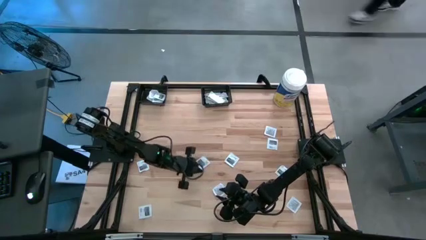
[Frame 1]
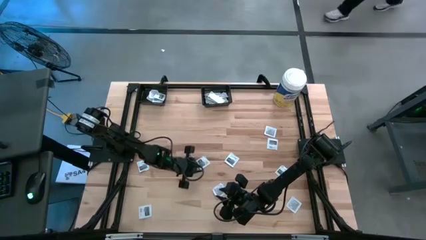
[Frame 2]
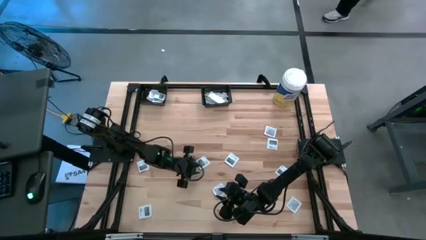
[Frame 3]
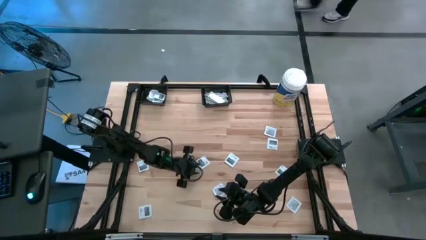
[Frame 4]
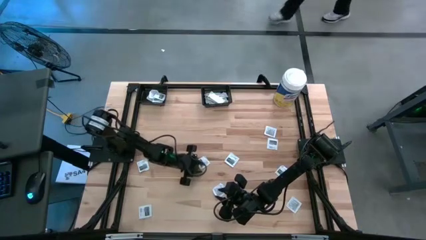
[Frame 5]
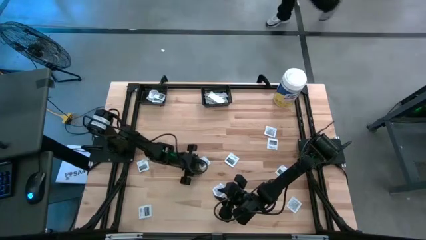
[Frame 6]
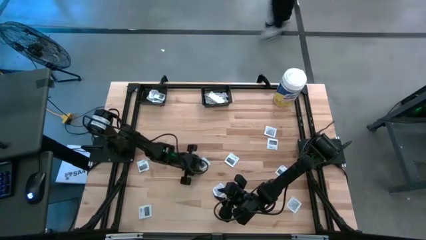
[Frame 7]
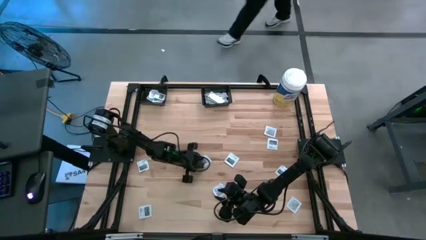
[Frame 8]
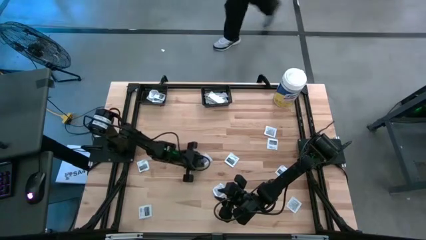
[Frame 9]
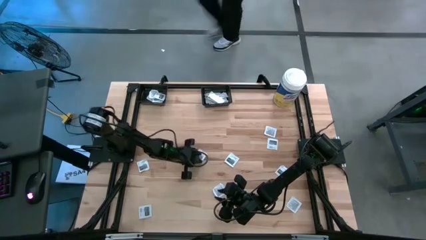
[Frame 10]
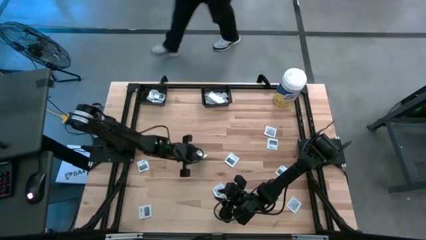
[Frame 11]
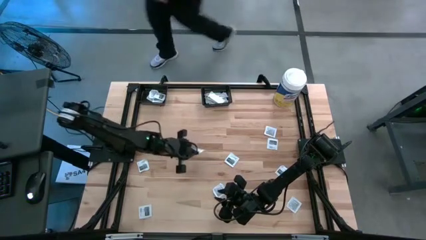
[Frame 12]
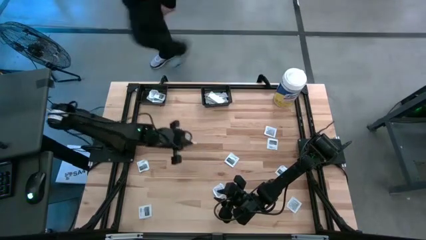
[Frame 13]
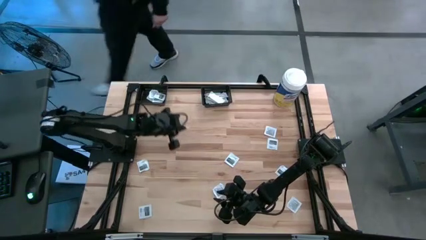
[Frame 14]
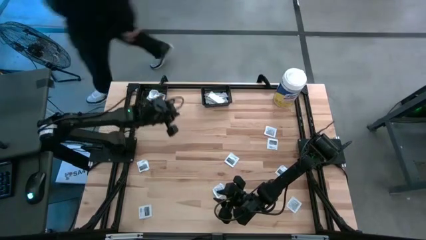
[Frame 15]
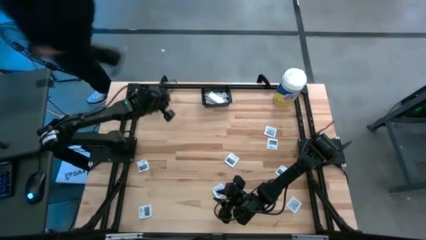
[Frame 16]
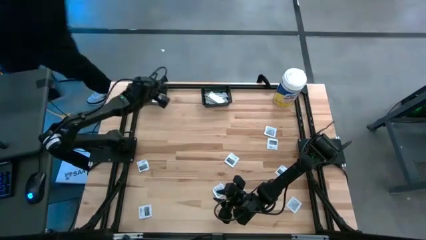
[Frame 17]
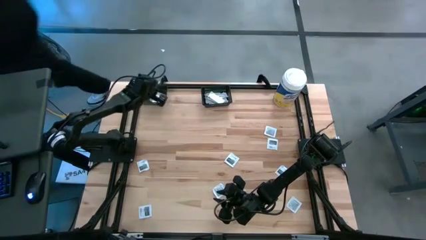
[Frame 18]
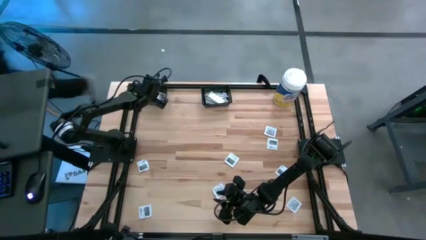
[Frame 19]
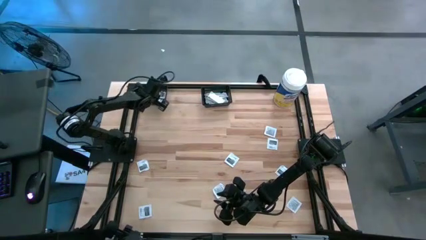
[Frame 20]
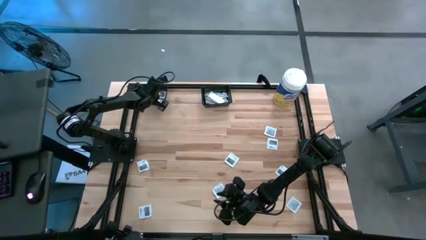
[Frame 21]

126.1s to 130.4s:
Task: Pick & Place First Aid Supplies
Put the gray towelette pack into the left black bin

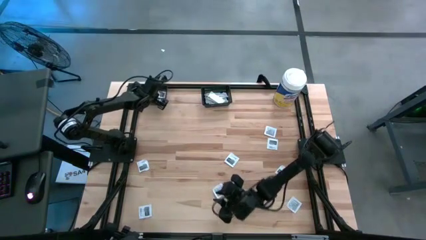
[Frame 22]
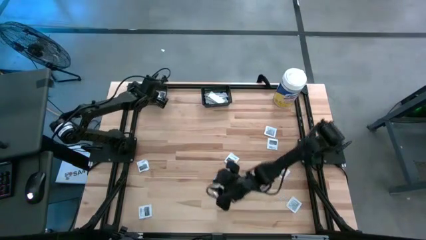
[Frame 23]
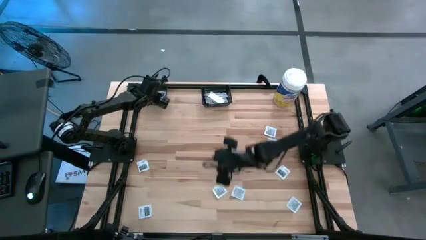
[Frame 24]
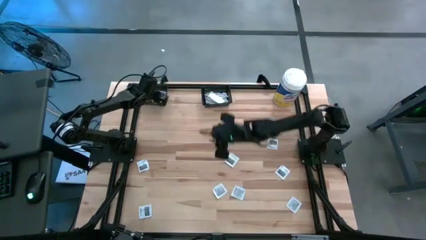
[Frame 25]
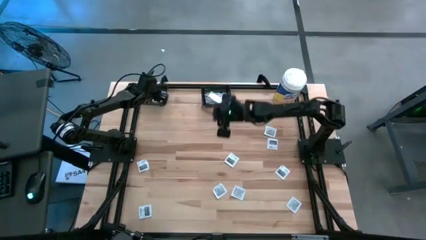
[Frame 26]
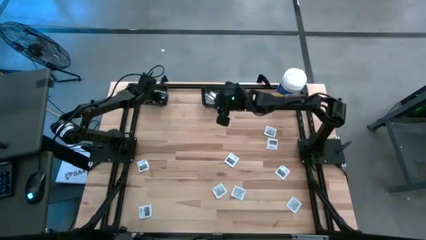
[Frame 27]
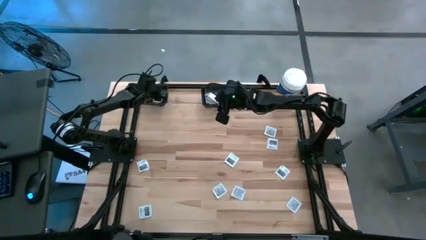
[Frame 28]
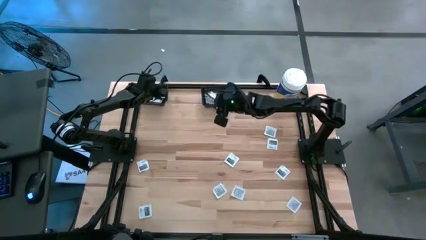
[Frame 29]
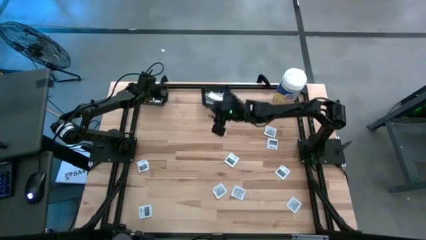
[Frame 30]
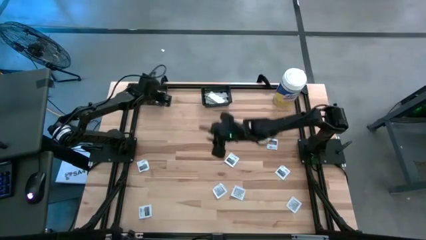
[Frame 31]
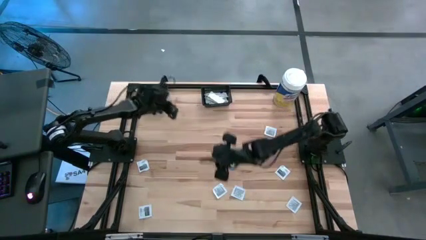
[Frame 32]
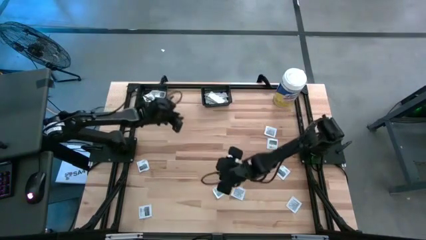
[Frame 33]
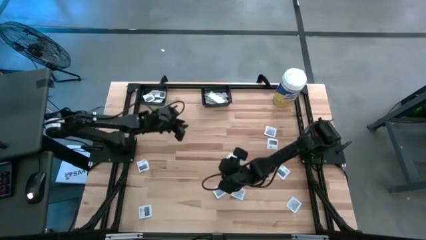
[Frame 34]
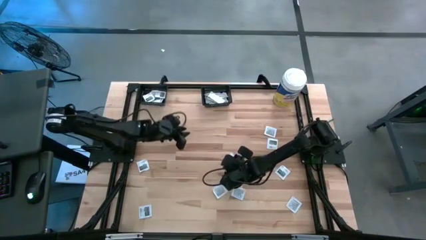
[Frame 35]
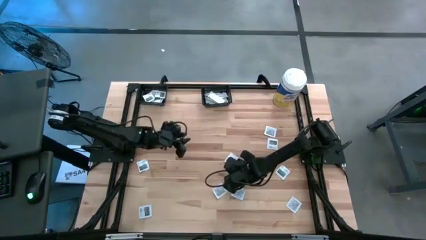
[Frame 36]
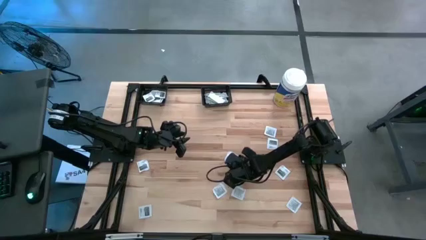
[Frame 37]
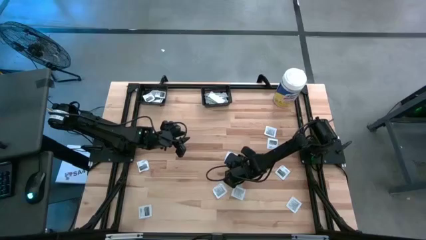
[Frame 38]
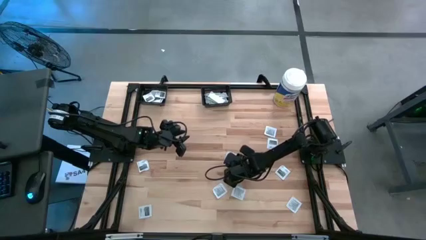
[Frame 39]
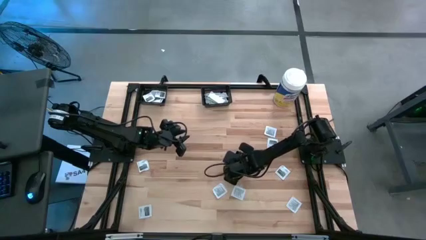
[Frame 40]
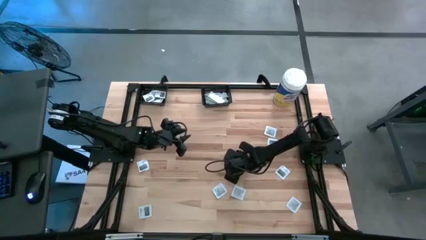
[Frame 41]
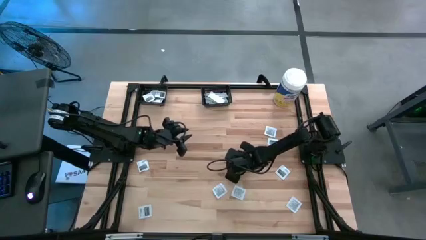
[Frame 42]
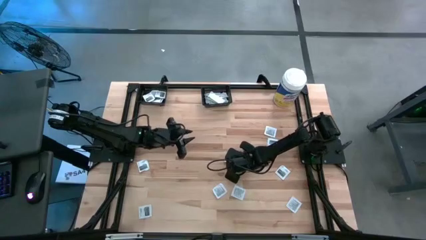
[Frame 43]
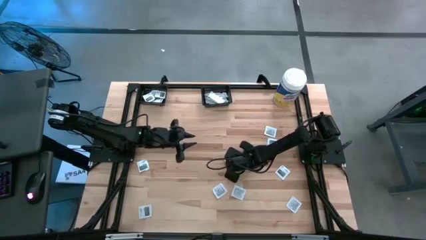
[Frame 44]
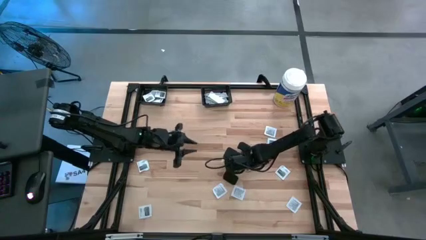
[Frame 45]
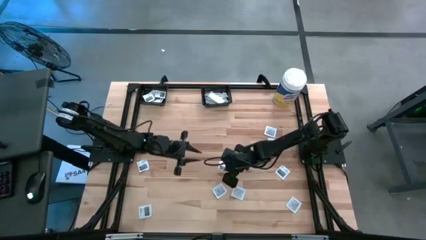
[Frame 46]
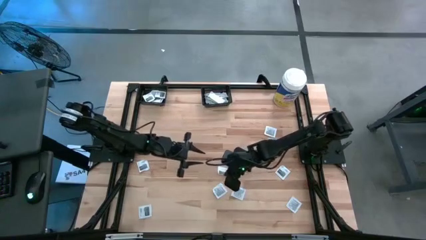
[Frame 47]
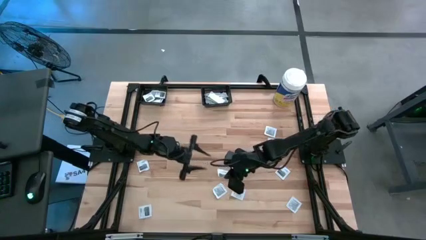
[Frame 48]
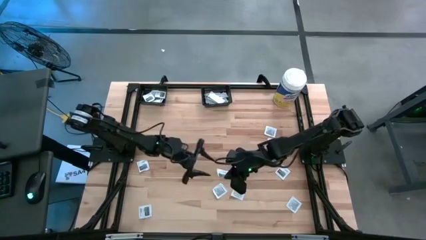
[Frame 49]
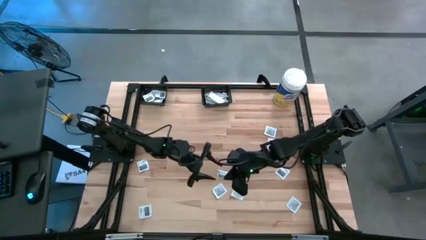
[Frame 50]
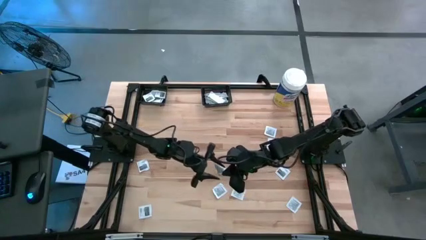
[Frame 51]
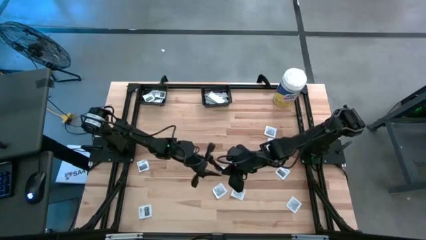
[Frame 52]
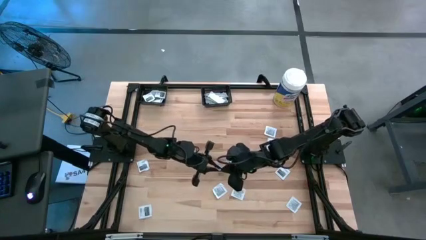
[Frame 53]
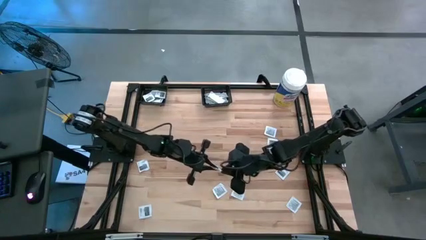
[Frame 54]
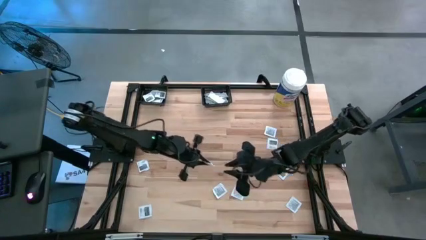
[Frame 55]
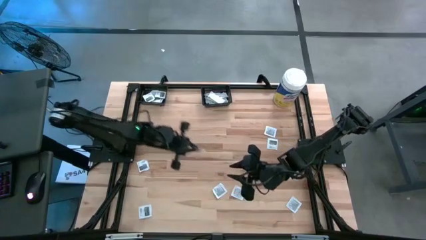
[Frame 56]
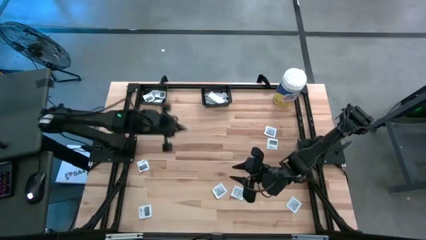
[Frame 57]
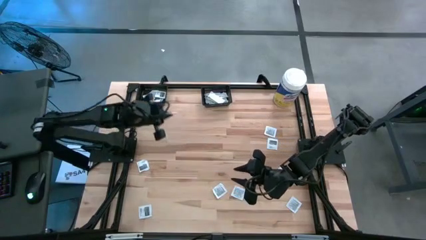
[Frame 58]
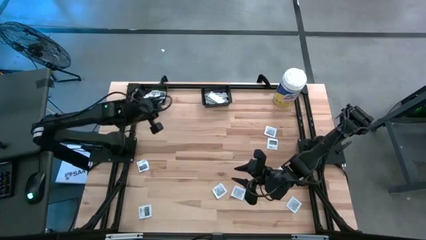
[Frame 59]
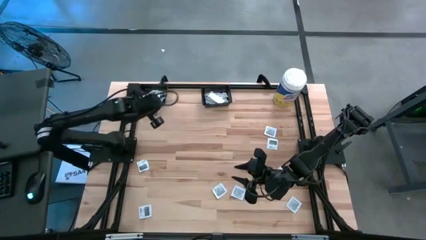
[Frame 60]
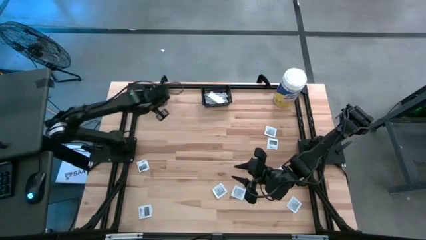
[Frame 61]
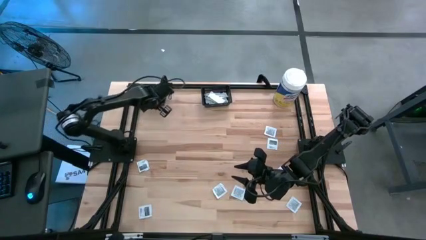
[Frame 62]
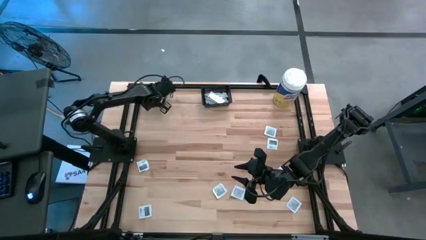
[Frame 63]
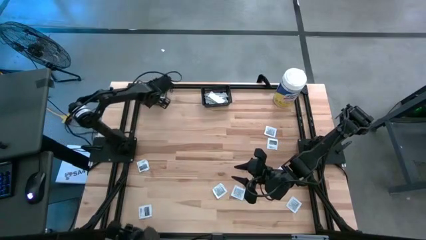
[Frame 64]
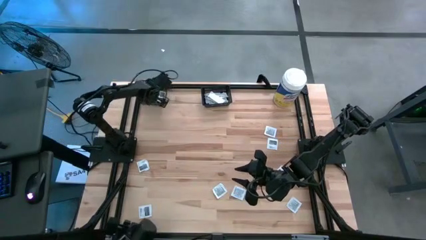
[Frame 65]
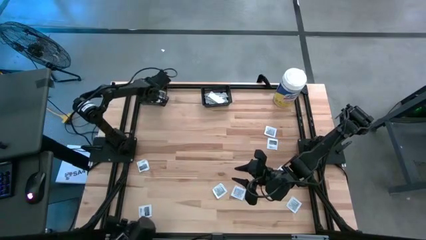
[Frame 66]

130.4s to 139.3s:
Put the gray towelette pack into the left black bin

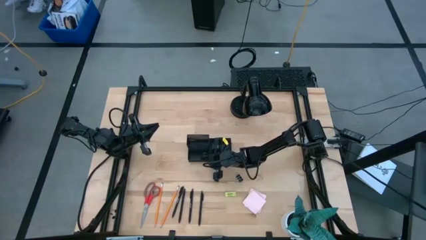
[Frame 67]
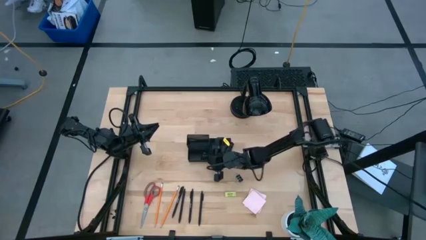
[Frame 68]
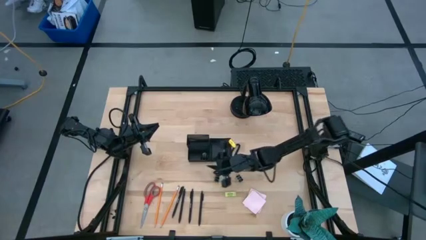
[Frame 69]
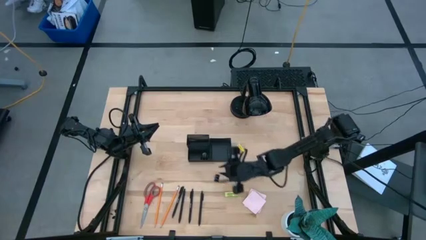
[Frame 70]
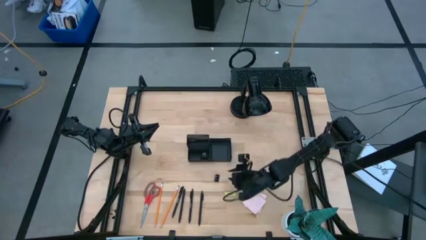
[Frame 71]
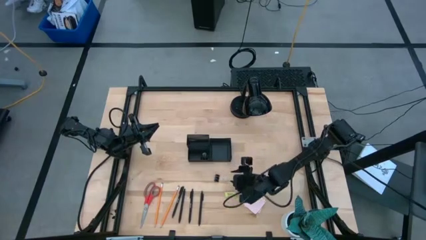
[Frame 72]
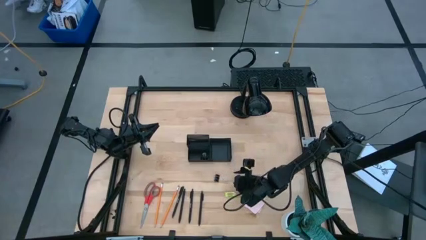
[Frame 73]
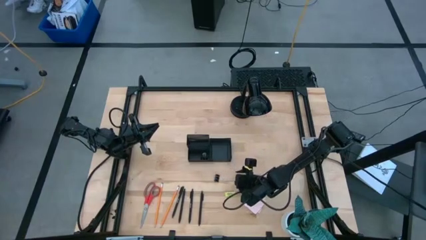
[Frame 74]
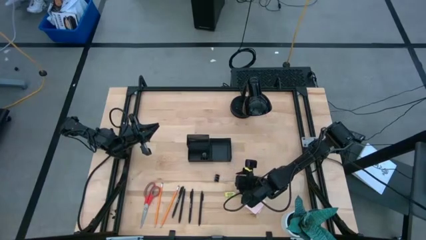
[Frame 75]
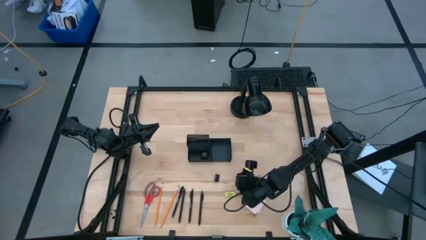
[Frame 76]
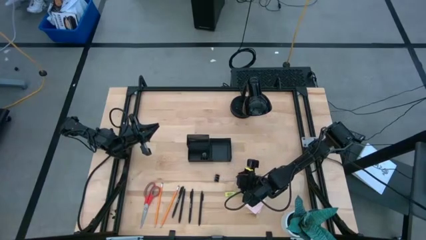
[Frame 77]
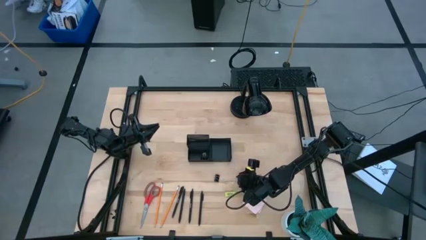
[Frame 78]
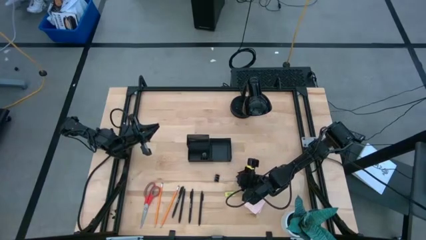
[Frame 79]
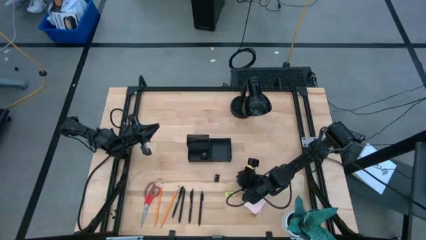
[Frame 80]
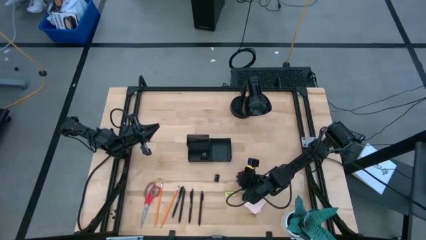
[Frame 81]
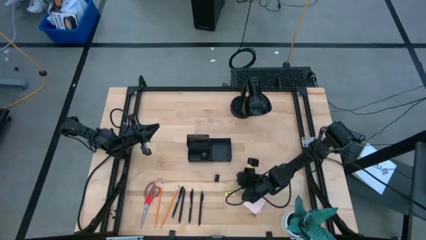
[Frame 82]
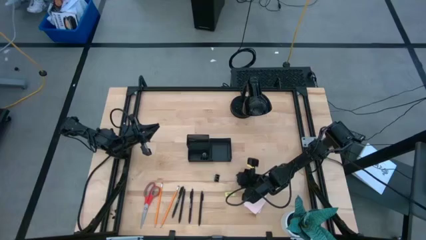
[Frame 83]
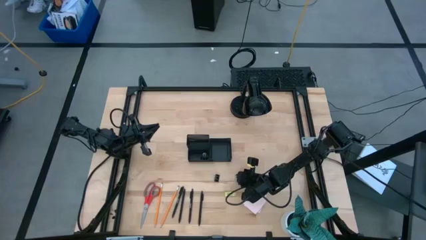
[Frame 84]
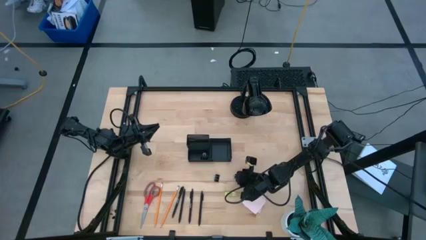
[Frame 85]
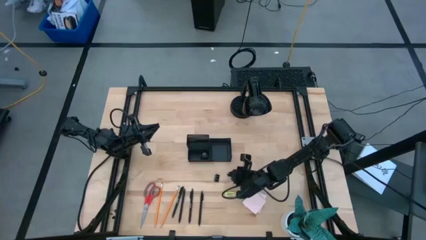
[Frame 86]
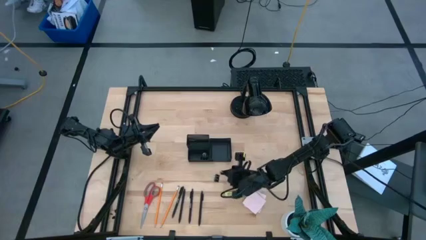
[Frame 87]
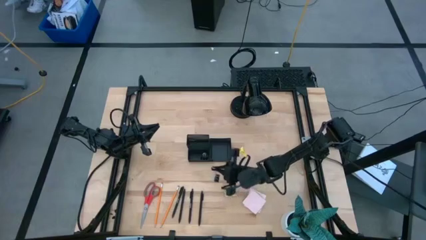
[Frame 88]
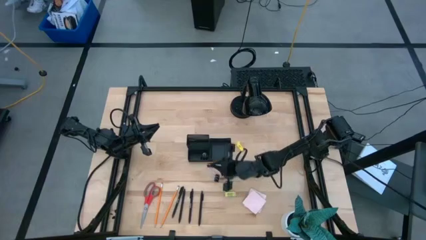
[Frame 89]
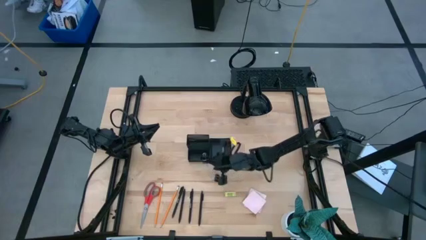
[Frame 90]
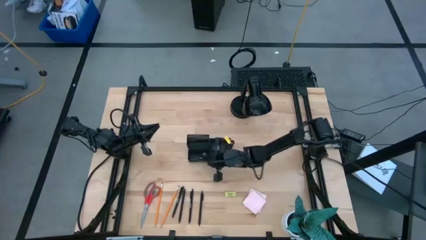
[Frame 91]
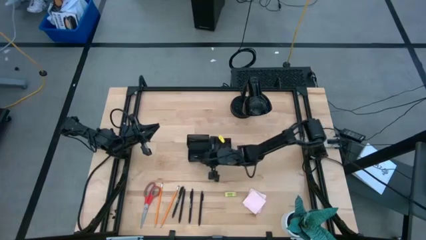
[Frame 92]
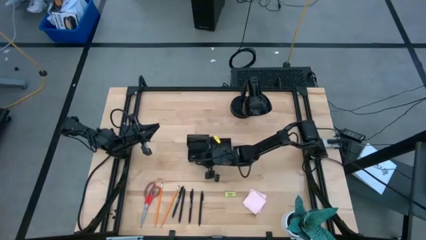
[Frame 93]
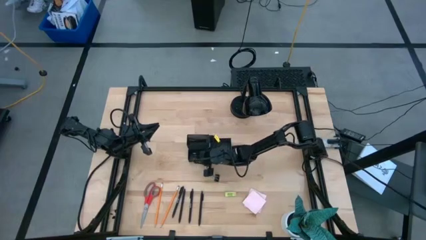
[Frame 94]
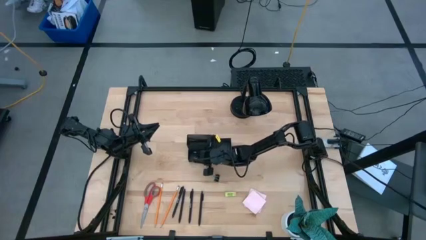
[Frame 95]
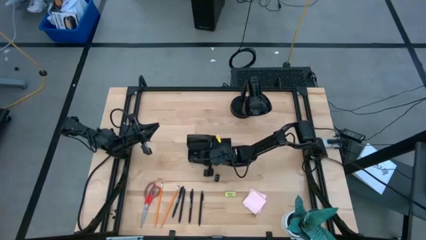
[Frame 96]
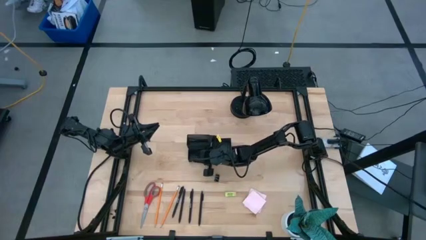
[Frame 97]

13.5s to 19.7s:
Task: Pick and place office supplies into organizer
Put the black binder clip into the black desk organizer
